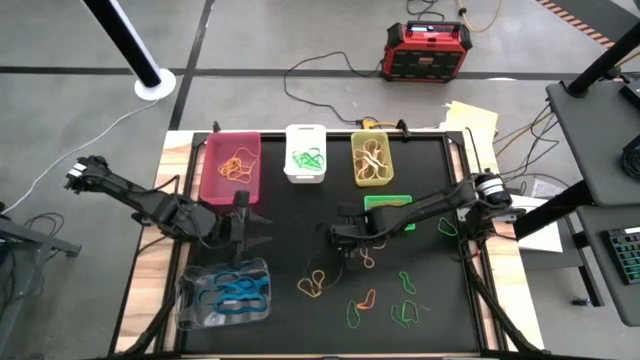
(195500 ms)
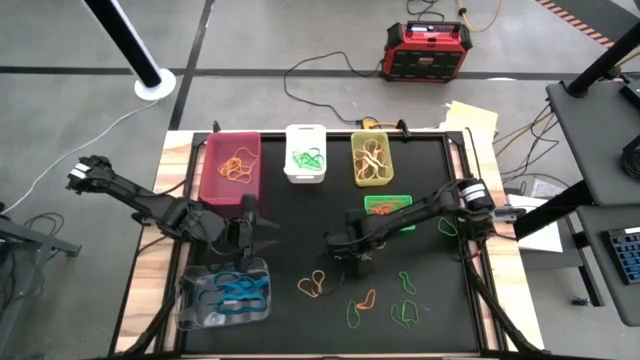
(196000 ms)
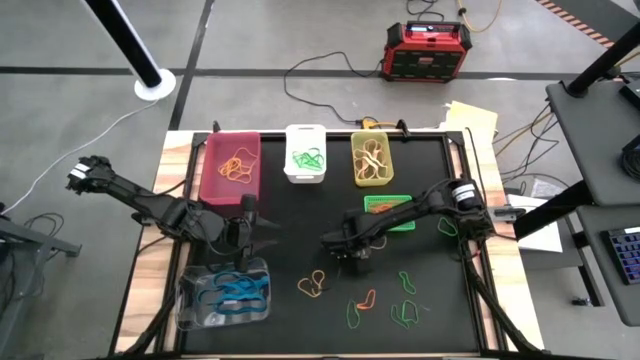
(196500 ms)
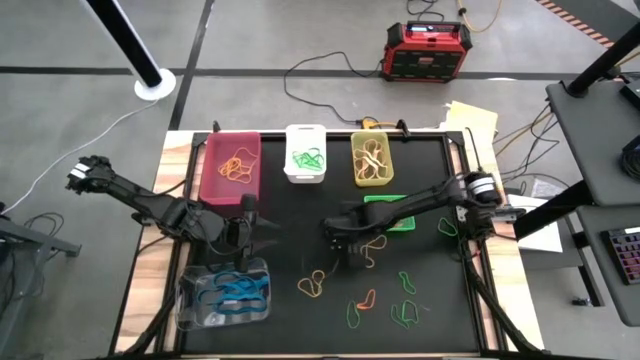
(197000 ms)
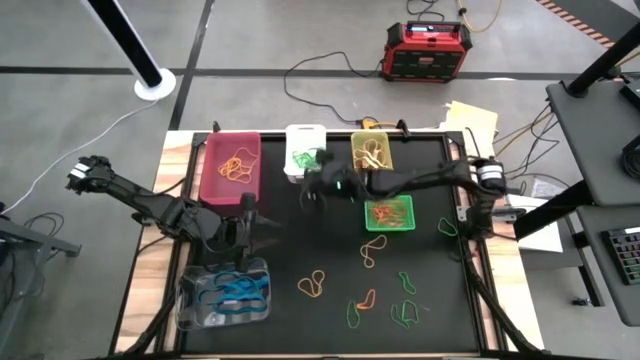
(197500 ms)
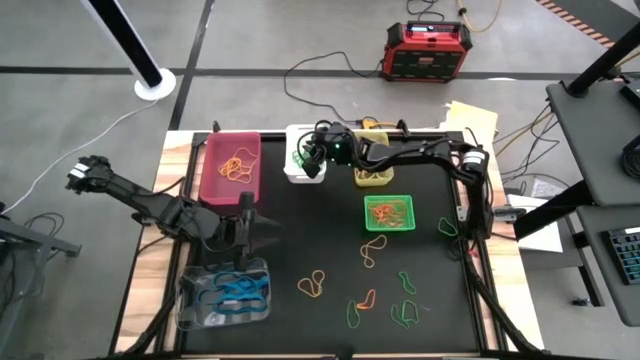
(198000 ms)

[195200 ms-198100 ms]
Task: Sort rubber bands into baskets
Put the green rubber band into the white bin

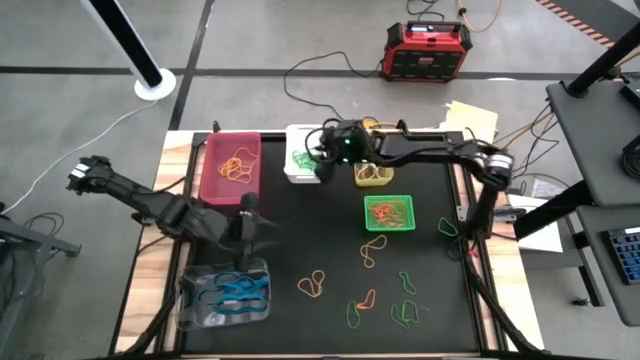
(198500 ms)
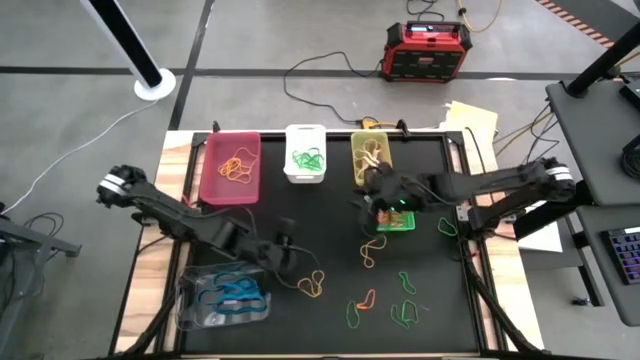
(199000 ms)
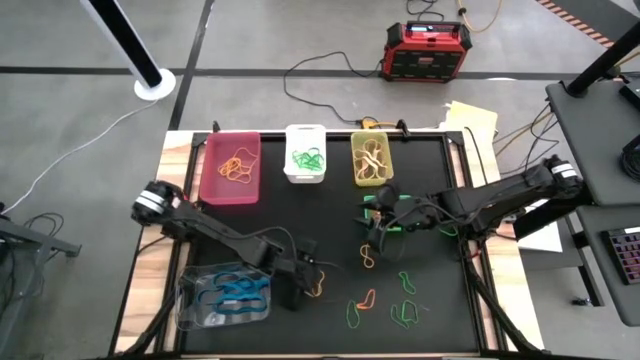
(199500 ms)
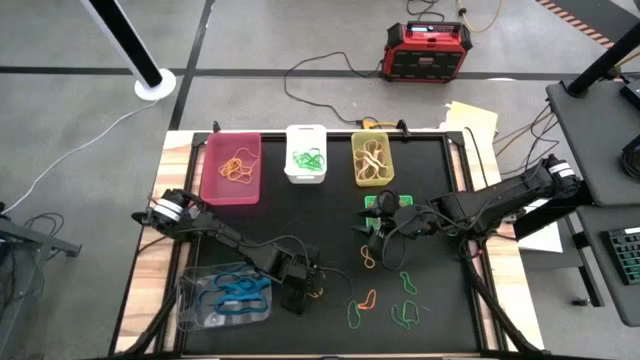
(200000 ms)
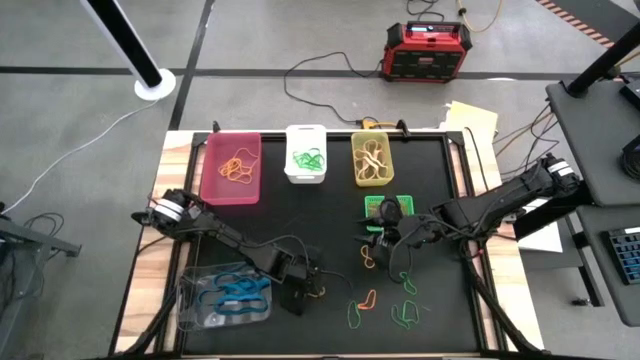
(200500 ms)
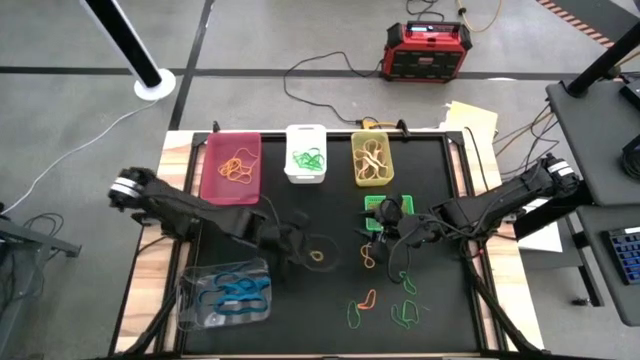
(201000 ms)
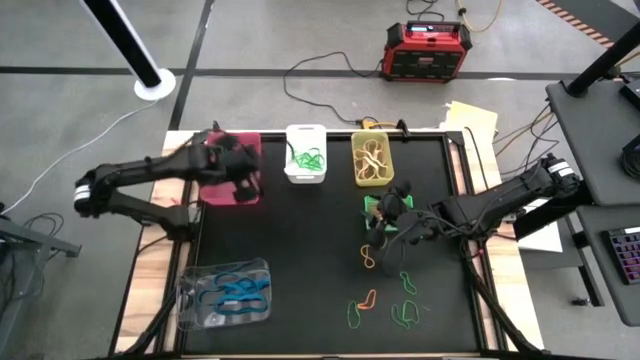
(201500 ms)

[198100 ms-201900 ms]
Put the yellow rubber band into the pink bin

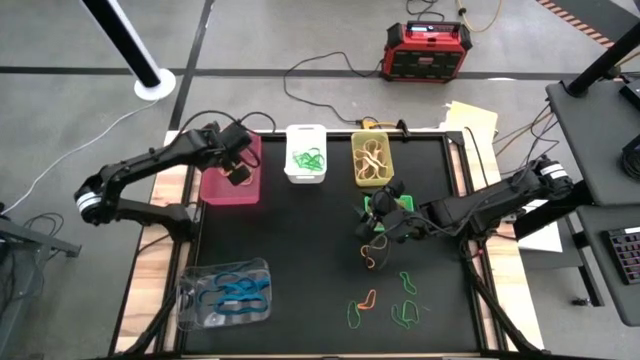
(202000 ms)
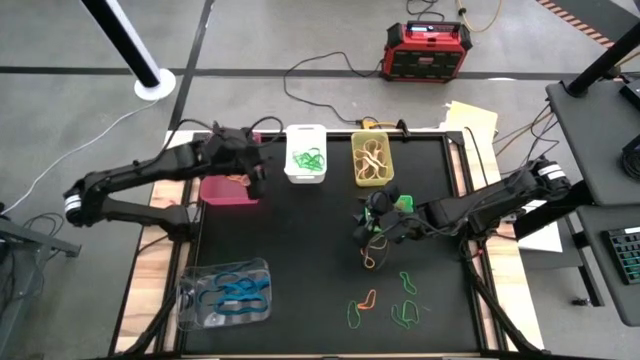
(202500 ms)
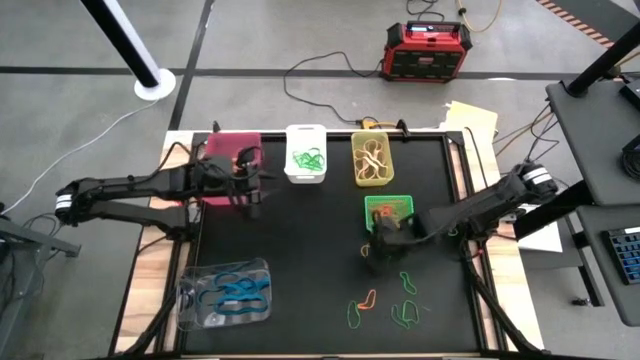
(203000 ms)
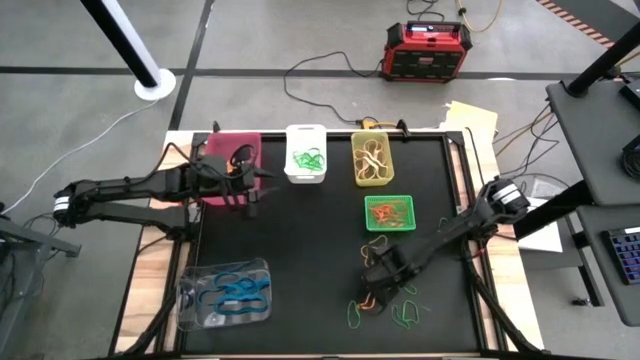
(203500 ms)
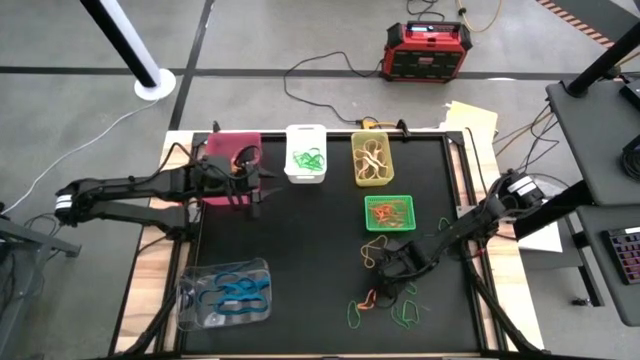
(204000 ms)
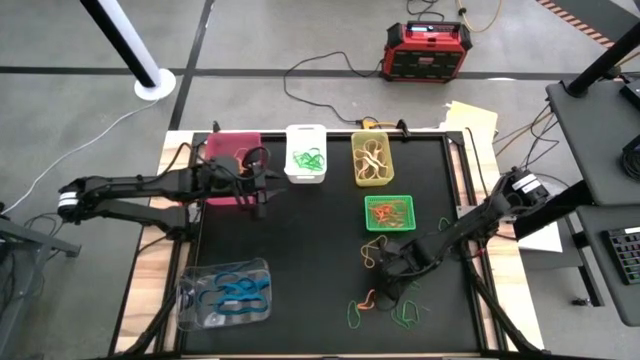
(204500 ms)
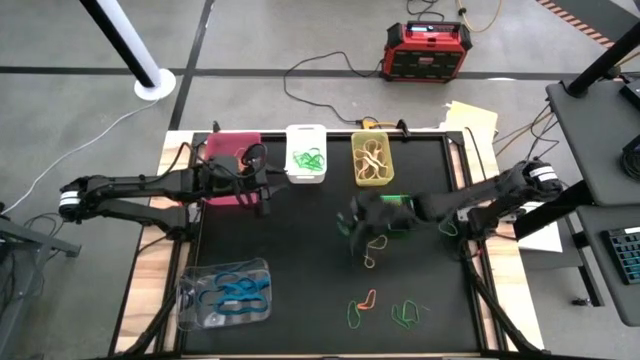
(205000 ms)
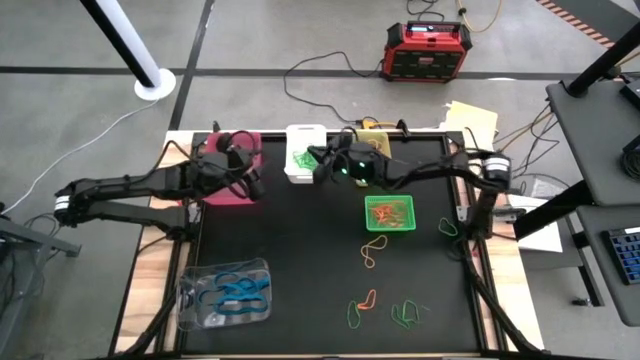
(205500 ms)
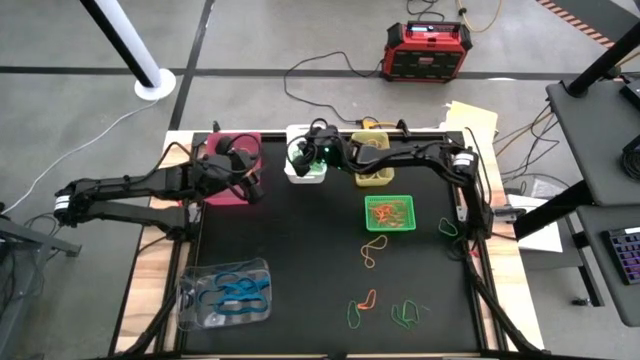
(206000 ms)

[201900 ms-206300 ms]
Put the green rubber band into the white bin

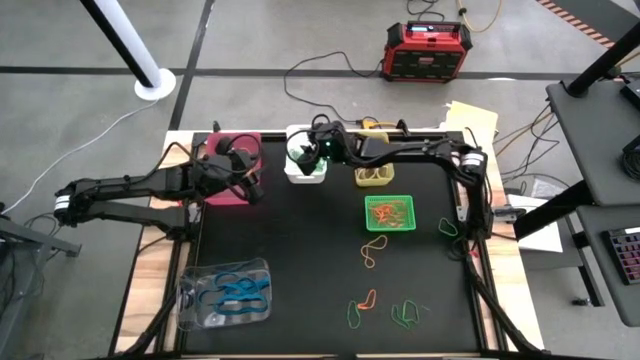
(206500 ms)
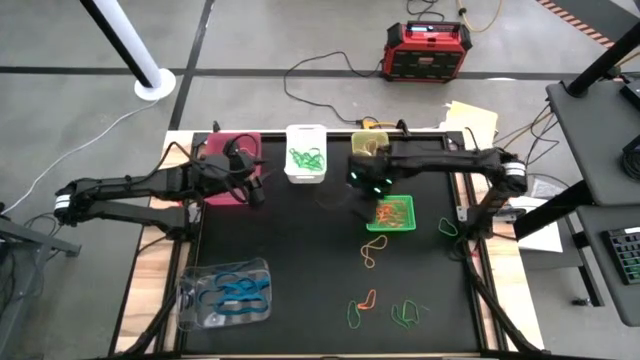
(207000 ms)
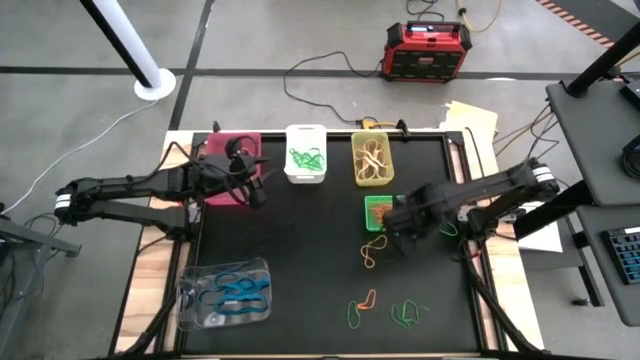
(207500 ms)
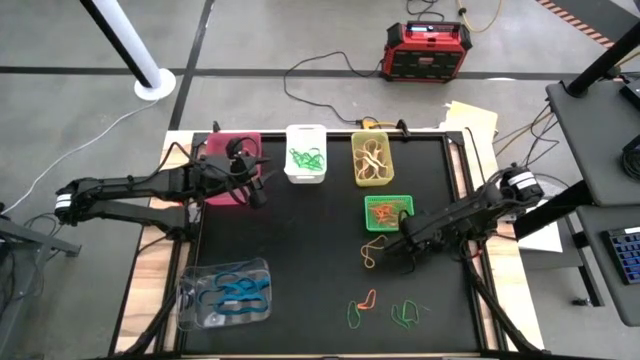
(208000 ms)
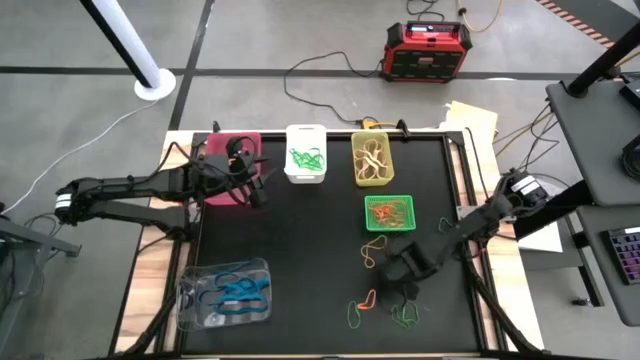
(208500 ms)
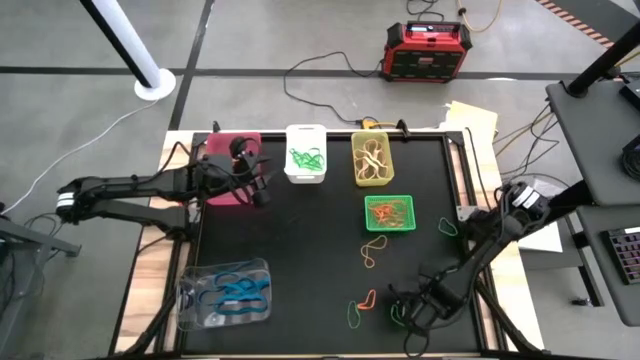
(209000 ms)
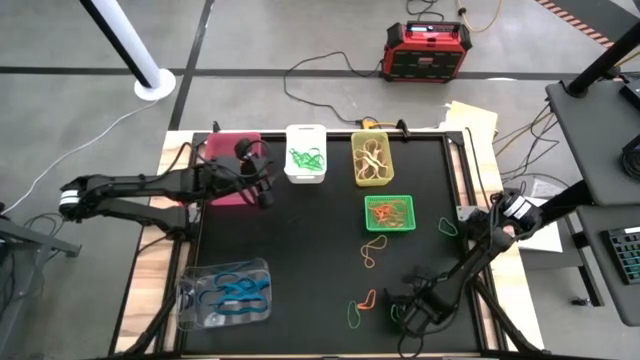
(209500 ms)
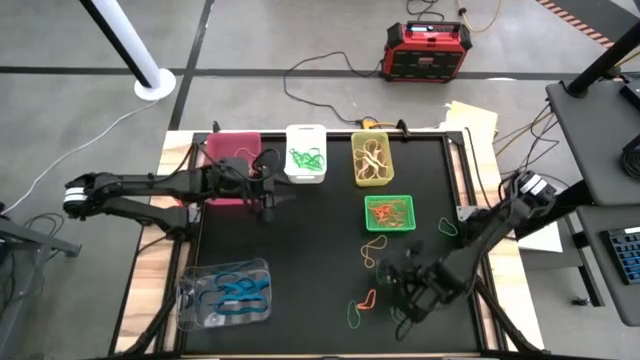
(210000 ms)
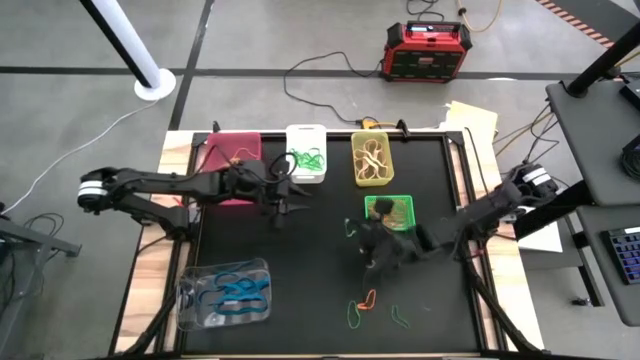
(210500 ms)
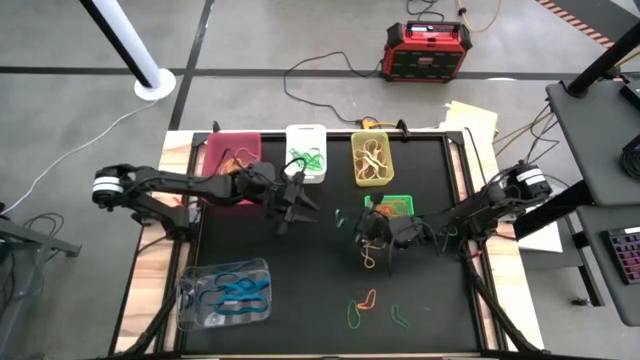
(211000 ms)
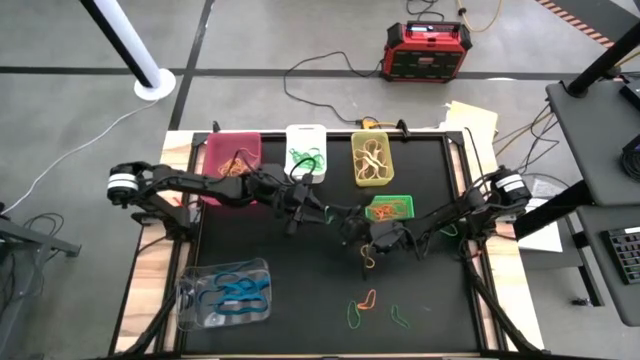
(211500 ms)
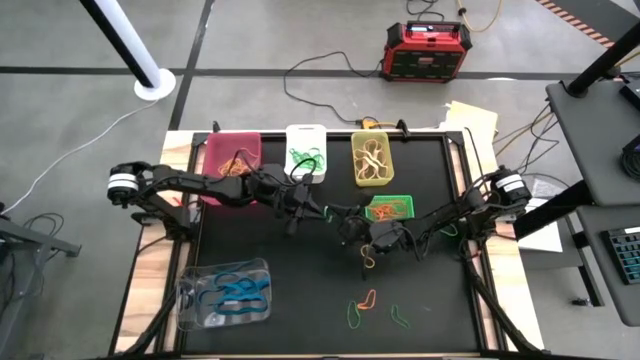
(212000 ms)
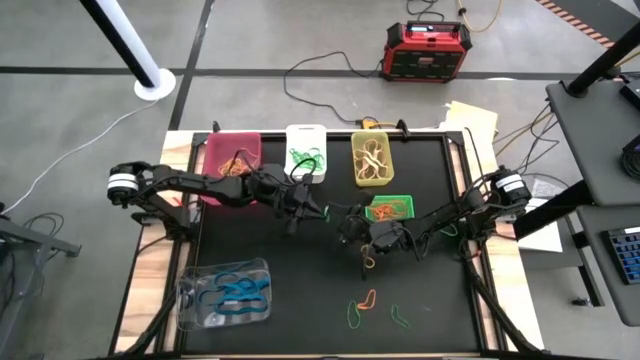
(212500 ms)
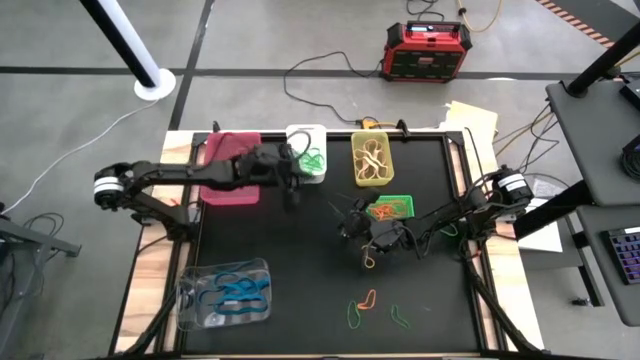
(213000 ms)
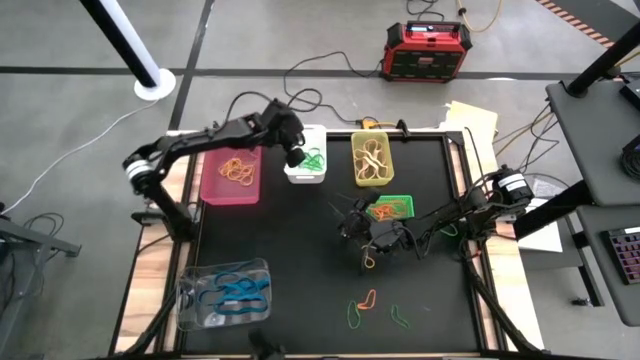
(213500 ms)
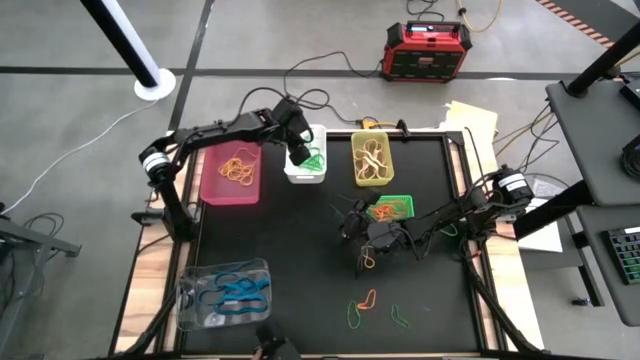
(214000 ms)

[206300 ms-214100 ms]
Put the green rubber band into the white bin

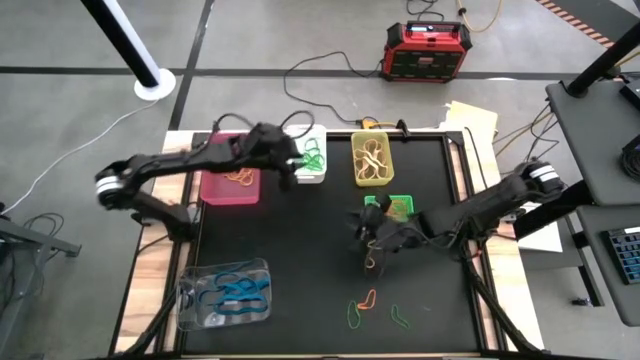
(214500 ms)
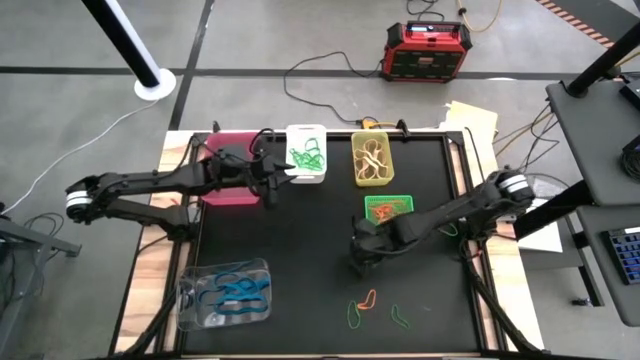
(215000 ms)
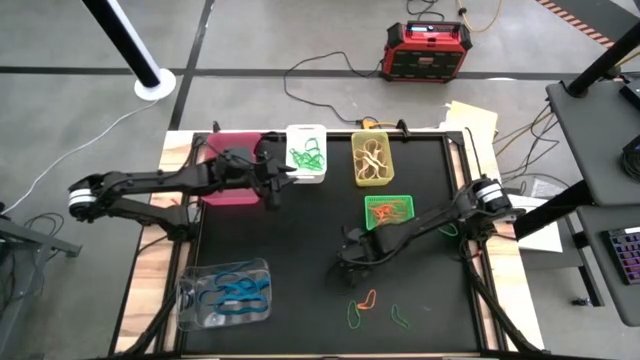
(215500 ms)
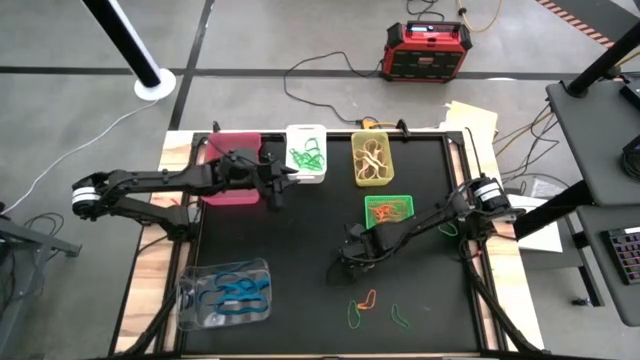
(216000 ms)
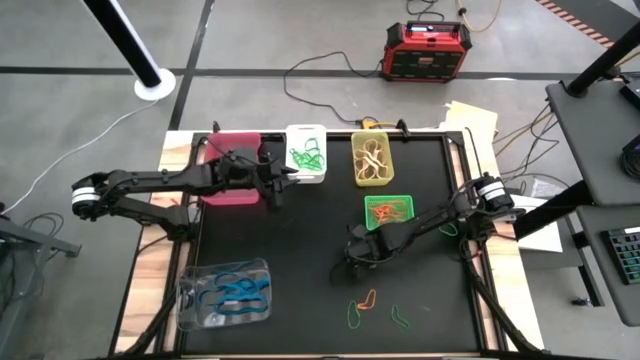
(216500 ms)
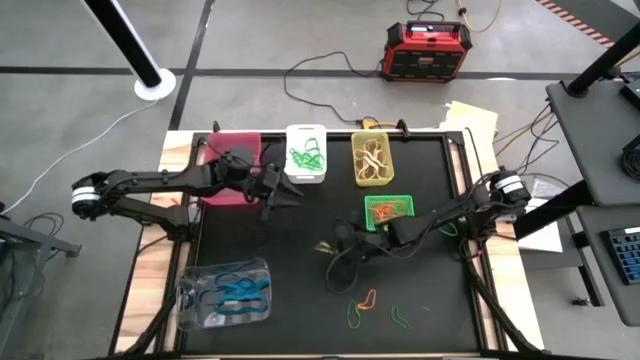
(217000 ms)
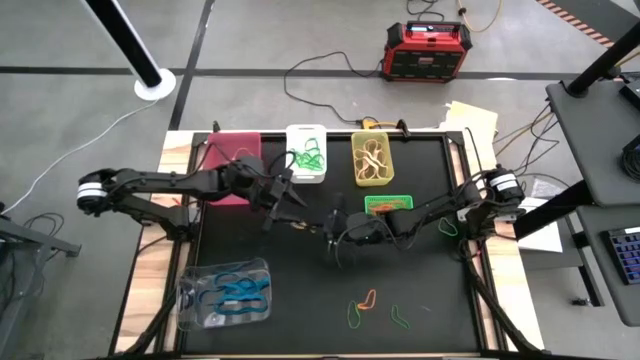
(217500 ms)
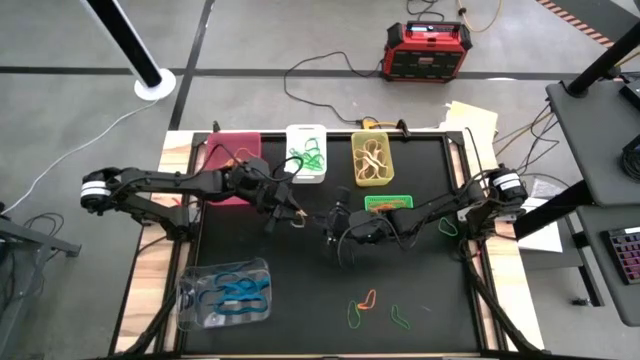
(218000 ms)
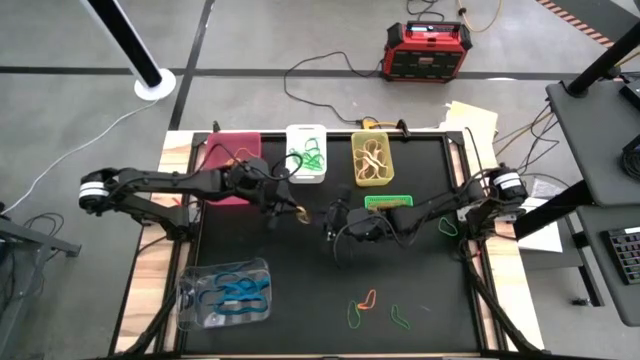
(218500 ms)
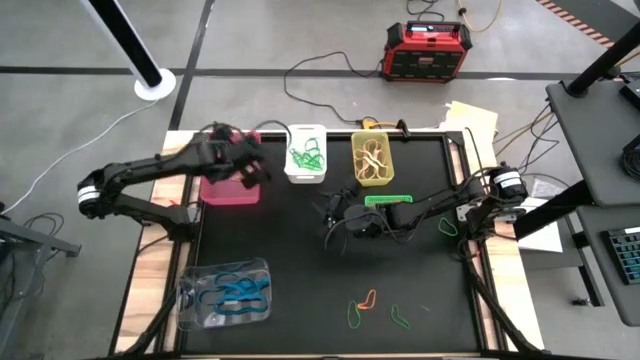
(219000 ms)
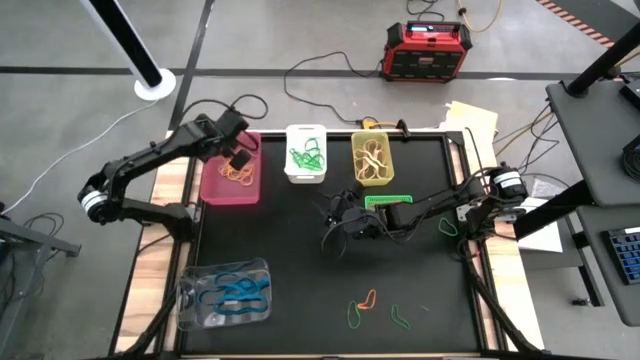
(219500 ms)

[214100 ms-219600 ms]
Put the yellow rubber band into the pink bin
